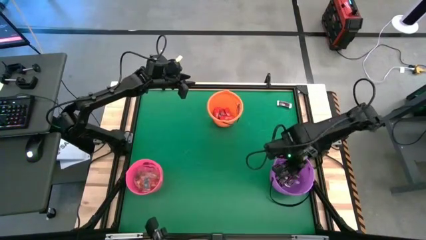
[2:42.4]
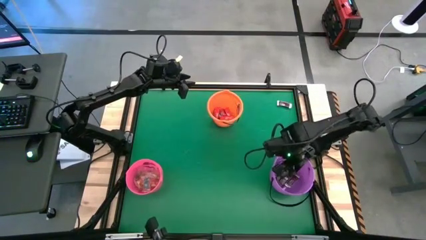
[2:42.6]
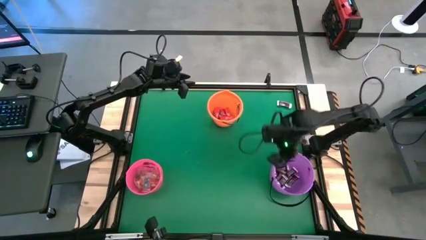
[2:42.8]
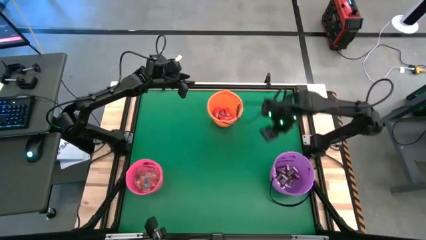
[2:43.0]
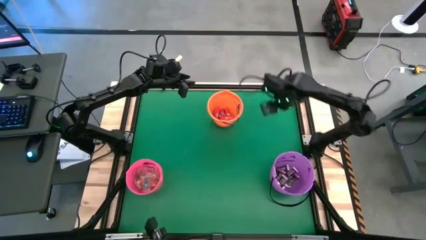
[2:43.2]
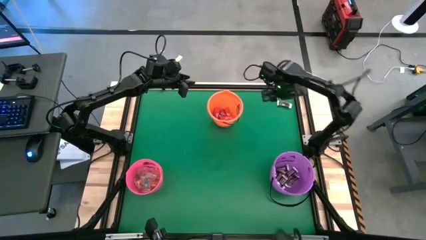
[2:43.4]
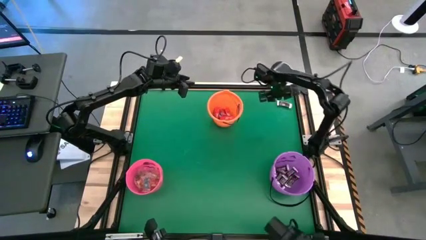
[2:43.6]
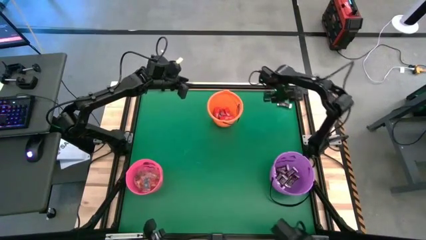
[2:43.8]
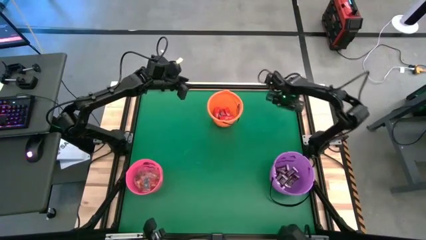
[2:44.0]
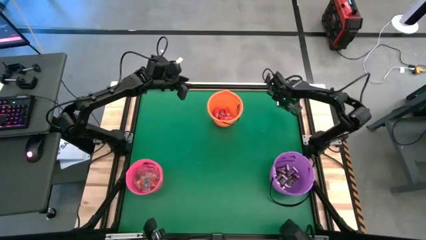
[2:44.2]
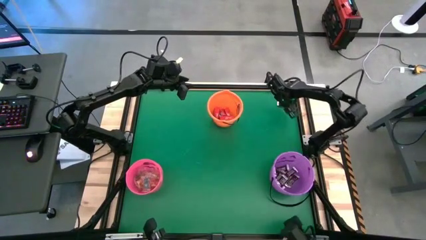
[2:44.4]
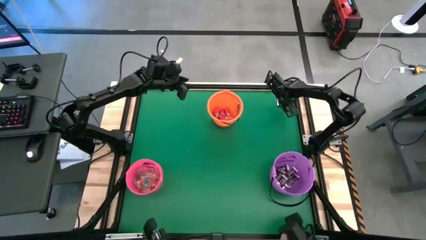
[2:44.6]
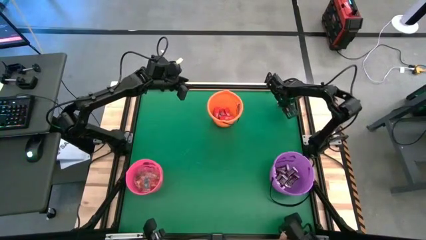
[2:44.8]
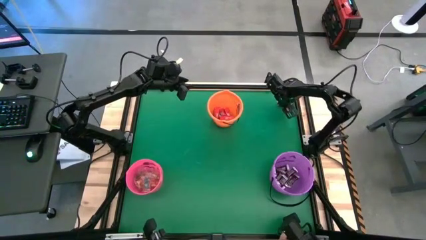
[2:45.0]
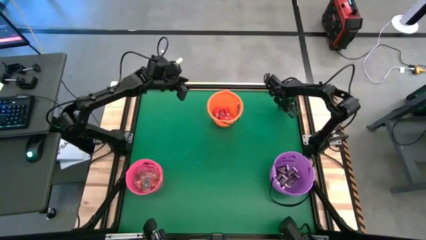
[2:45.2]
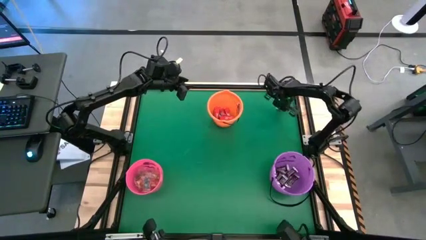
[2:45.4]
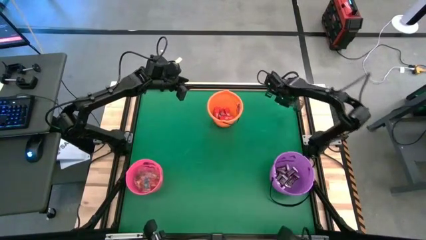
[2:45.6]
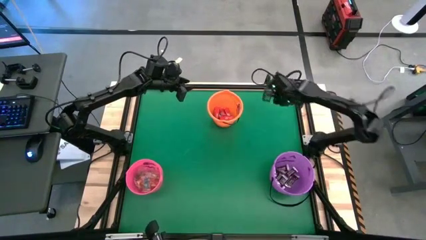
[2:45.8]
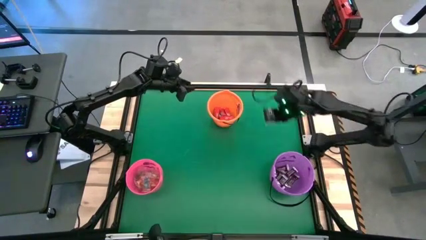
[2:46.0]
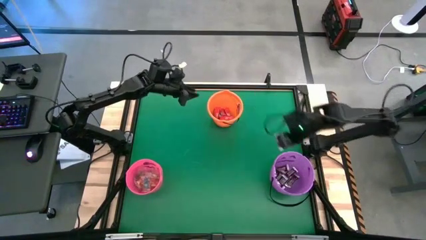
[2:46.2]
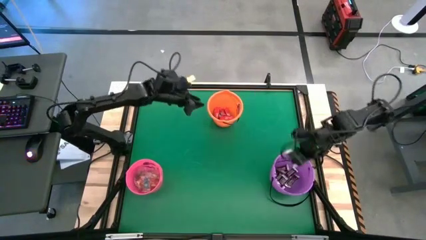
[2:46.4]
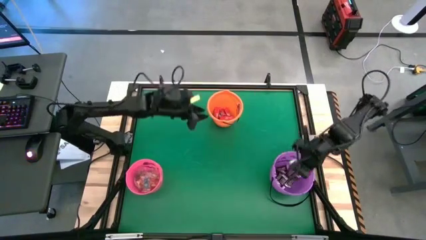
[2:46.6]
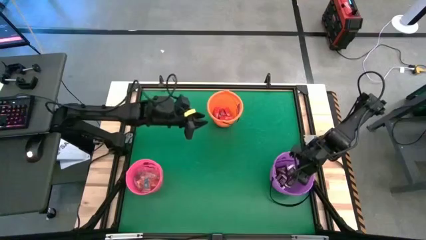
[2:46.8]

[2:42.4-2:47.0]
Task: Sort candy by brand, put in halloween buckets
Put the brown chocolate into the violet bucket

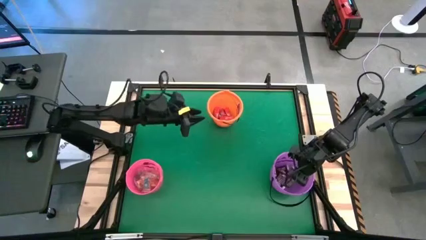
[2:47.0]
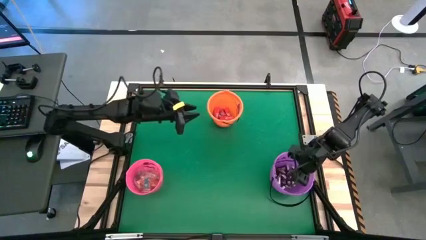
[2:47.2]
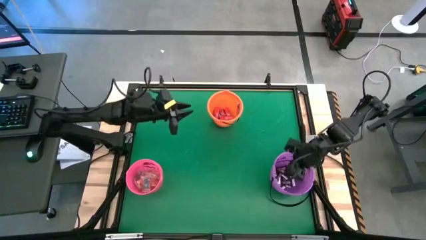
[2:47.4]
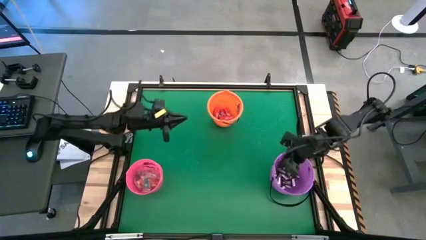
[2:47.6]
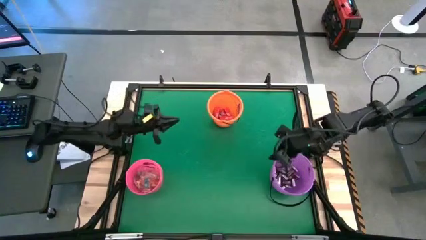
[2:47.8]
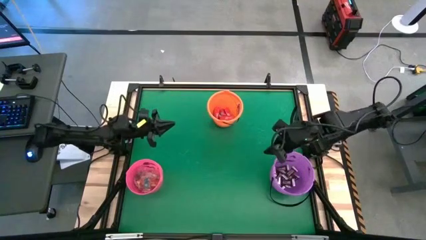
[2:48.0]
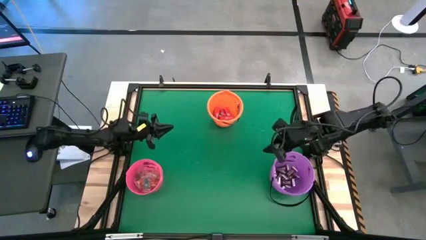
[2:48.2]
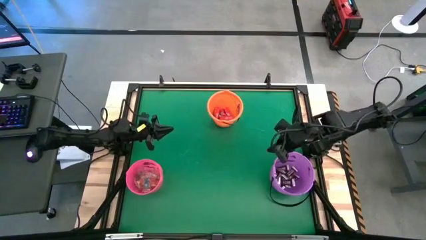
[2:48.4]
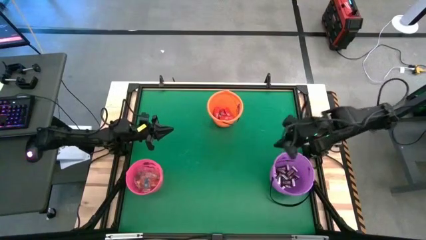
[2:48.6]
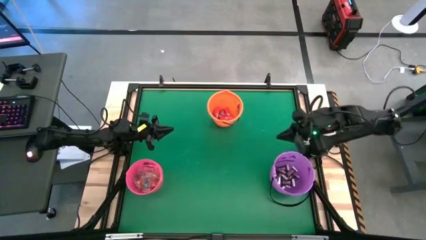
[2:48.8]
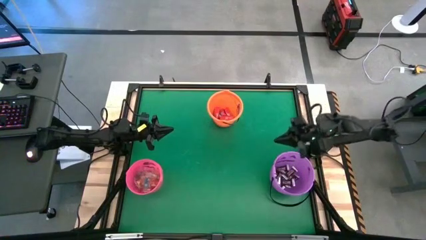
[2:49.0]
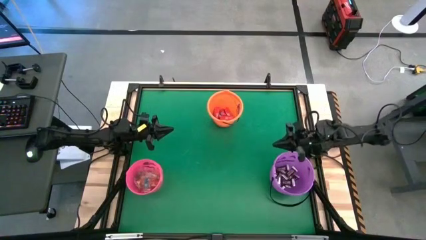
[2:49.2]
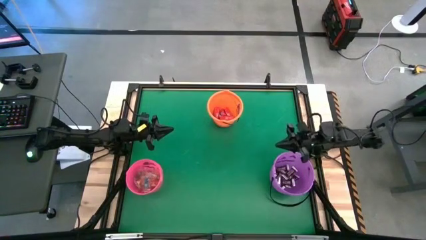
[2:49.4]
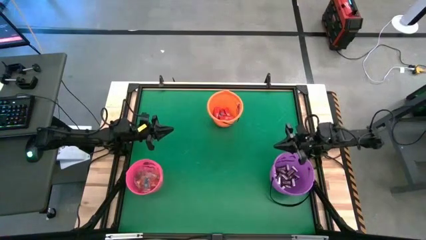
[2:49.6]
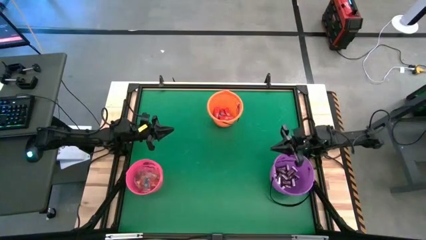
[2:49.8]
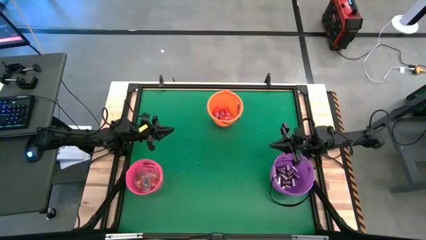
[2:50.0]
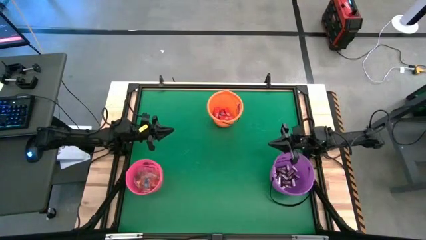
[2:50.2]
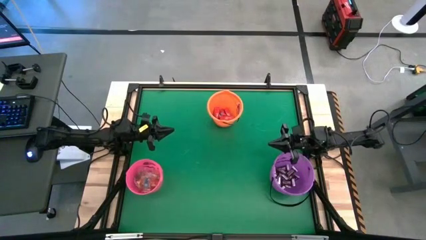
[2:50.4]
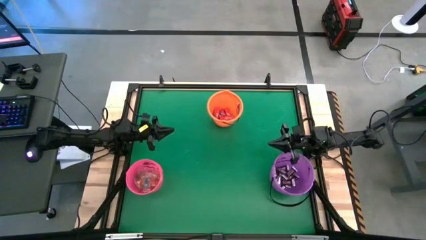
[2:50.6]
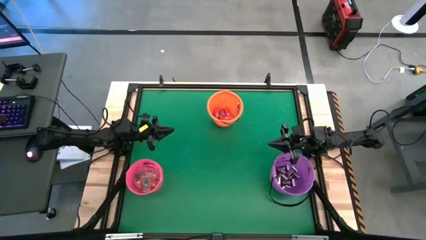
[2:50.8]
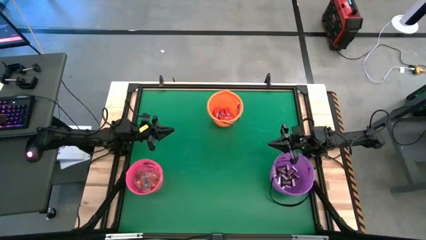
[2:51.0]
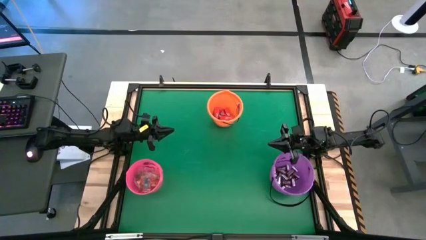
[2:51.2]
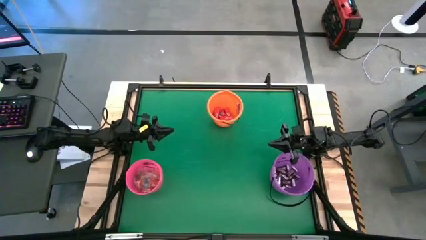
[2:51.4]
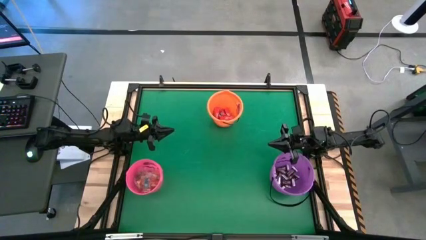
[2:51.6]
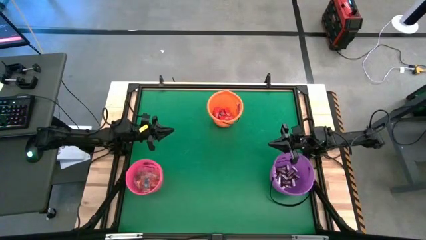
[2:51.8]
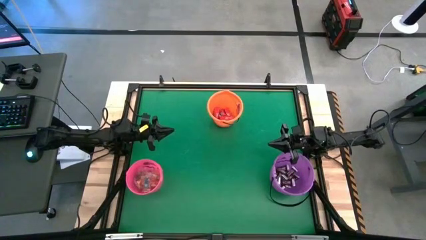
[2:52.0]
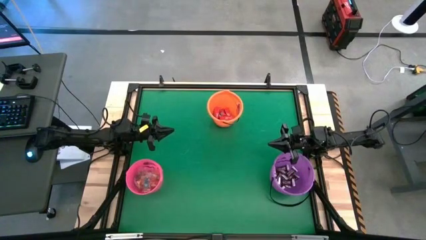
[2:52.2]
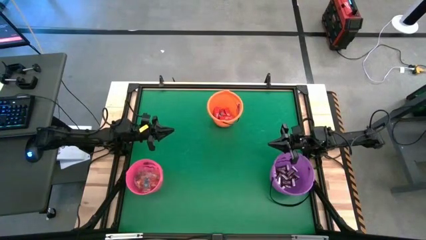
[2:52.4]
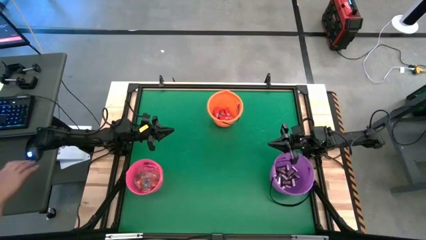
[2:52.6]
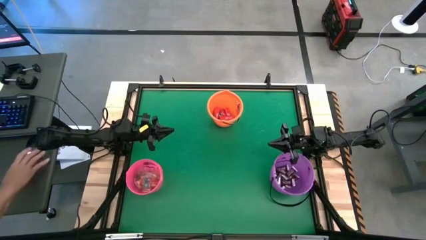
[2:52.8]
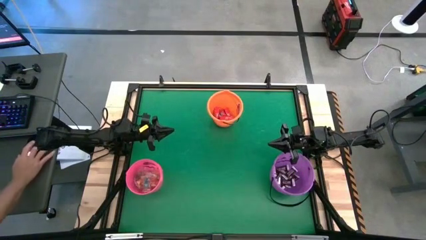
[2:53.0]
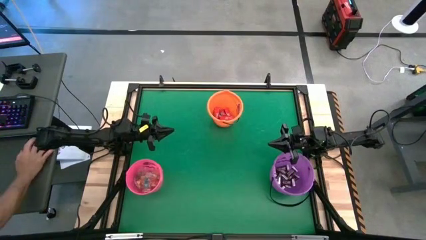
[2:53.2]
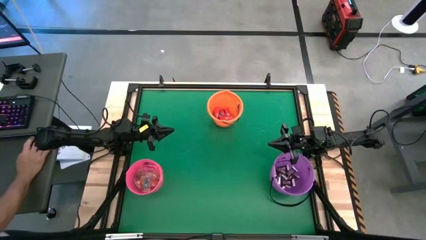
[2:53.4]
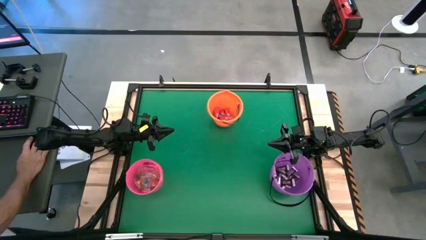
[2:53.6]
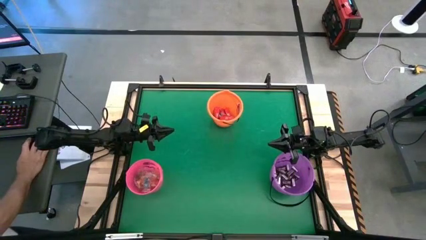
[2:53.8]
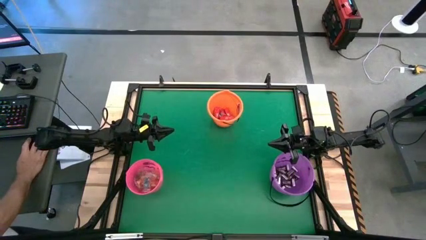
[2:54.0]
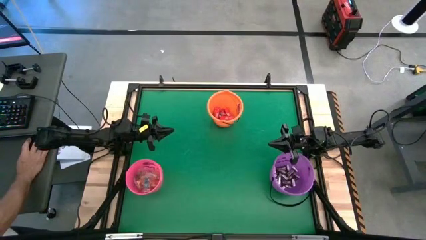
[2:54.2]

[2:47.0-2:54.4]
Return to Home Position

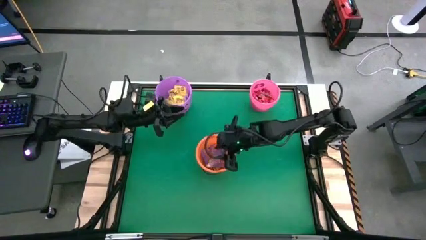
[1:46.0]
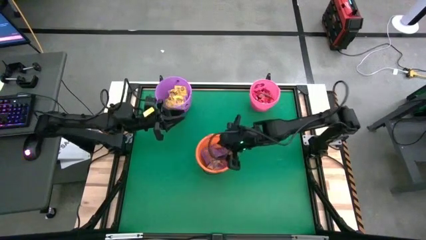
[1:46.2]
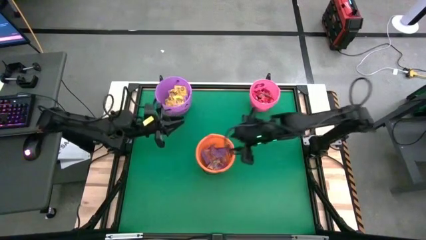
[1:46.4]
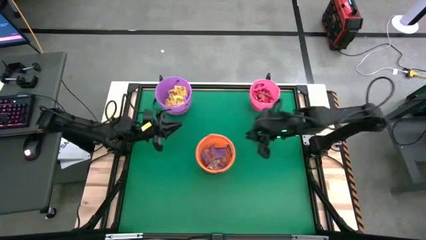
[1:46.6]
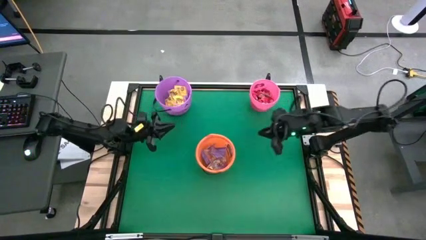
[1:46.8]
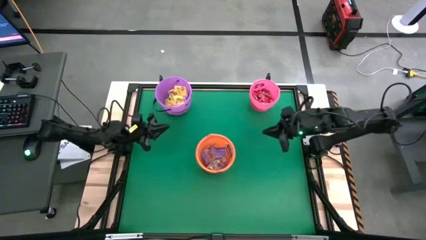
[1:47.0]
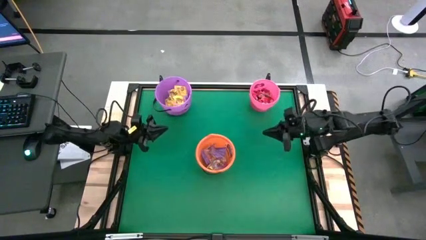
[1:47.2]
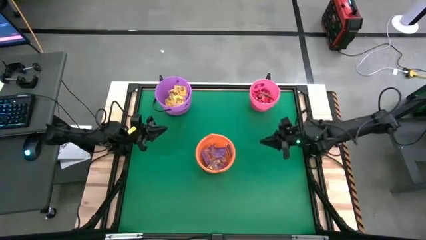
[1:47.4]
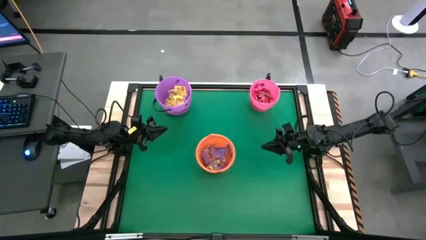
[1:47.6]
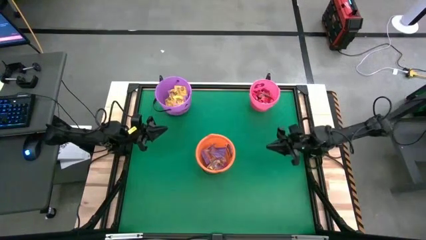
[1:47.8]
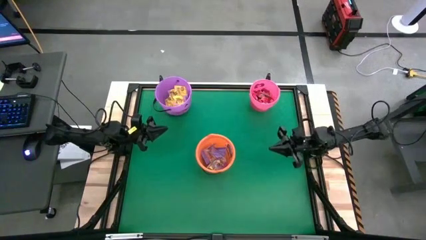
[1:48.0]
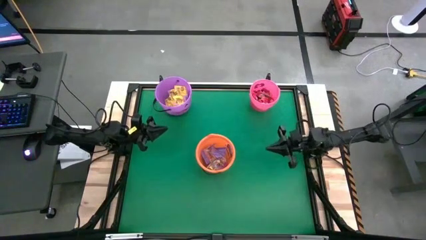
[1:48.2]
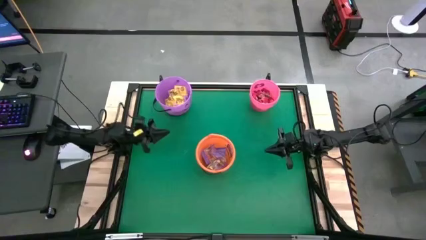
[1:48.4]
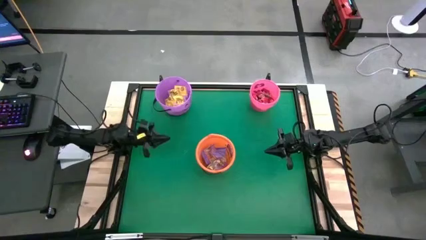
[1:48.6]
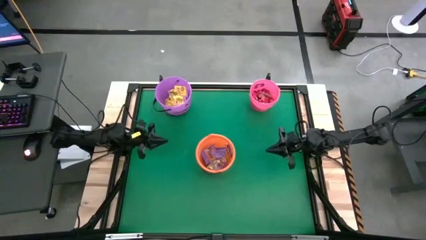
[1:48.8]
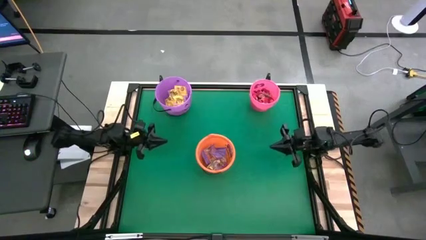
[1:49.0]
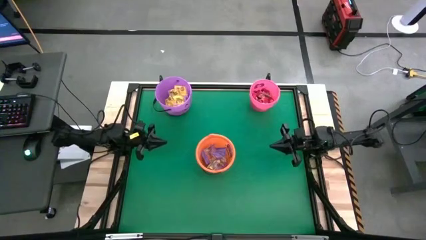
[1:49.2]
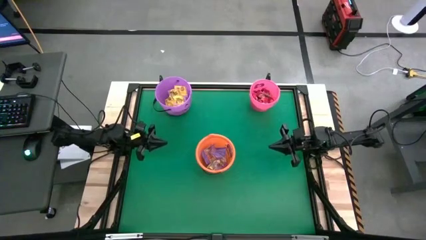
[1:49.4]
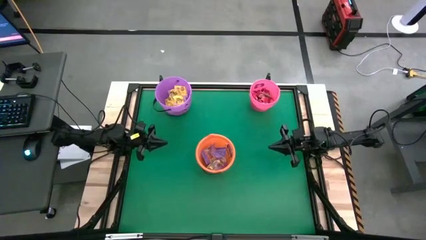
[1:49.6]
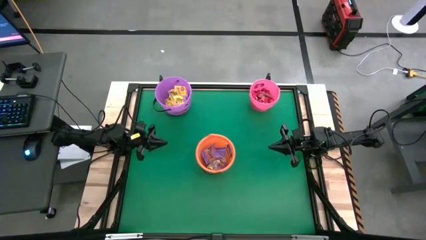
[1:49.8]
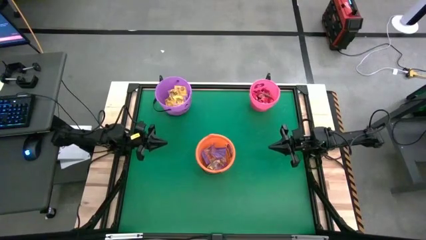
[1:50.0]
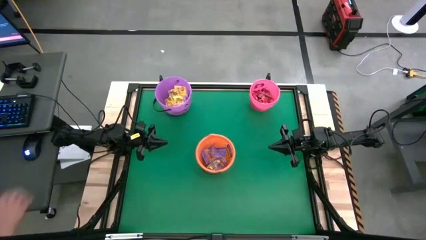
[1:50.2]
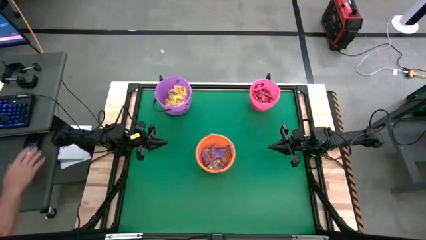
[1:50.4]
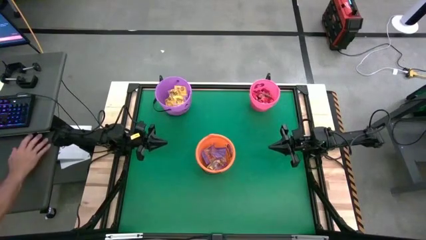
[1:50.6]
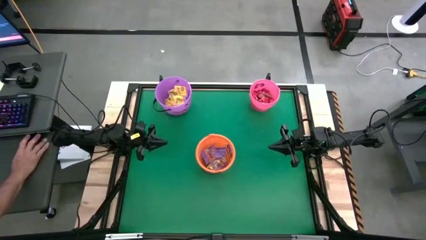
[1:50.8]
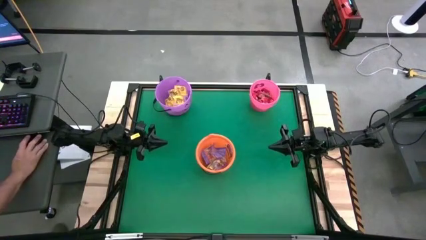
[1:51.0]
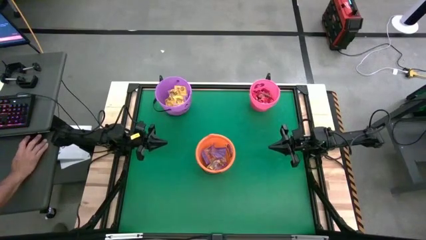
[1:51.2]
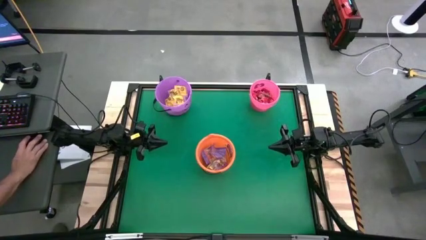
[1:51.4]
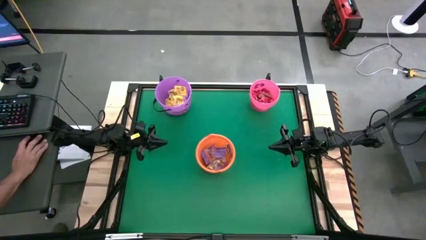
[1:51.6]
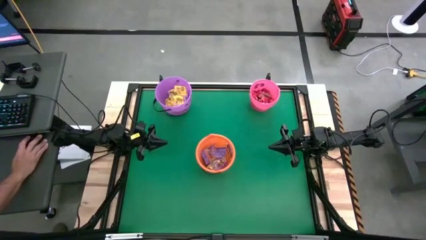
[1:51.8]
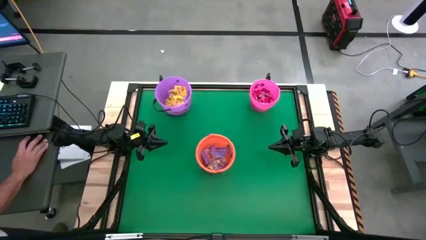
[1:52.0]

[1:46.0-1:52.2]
Task: Sort candy by brand, put in halloween buckets
Return to Home Position
